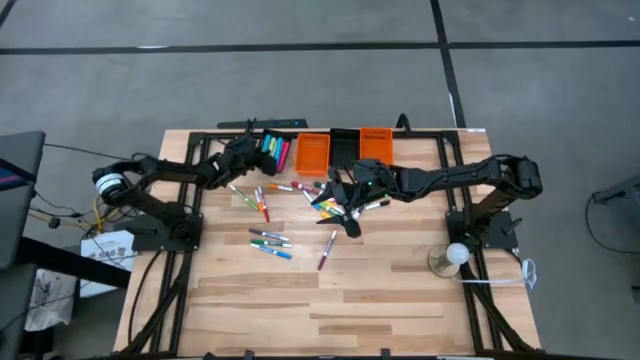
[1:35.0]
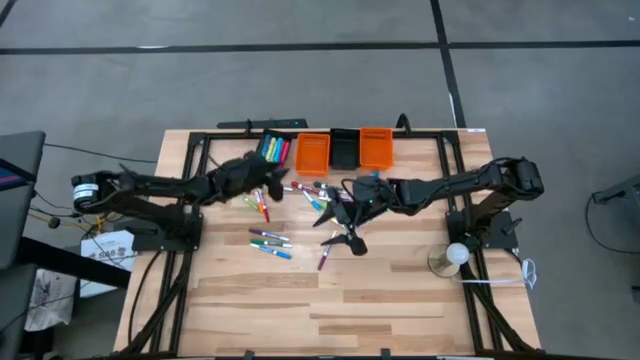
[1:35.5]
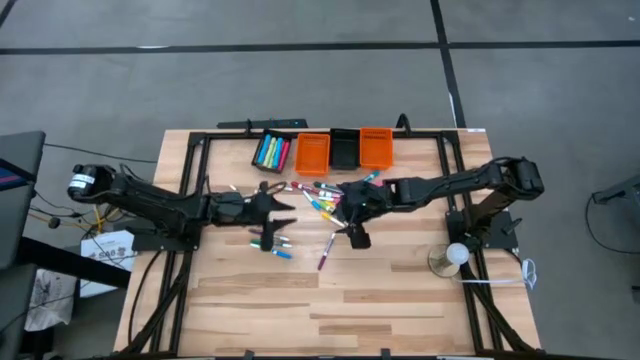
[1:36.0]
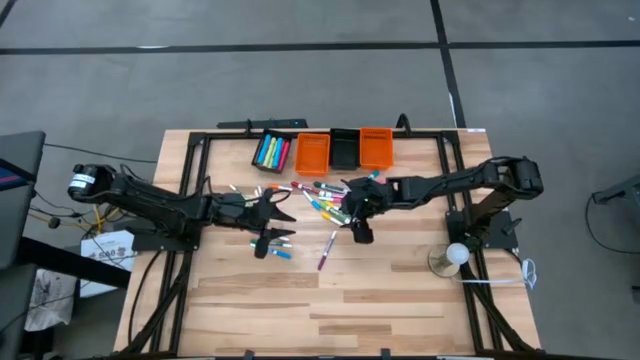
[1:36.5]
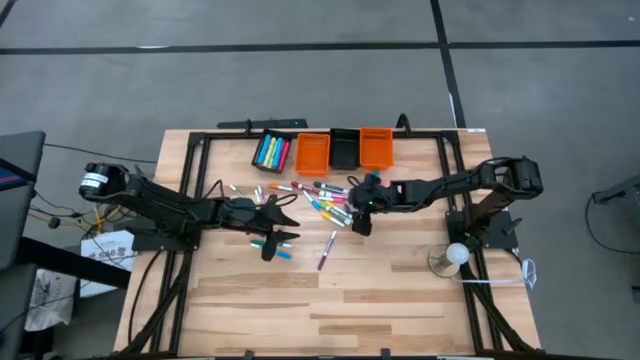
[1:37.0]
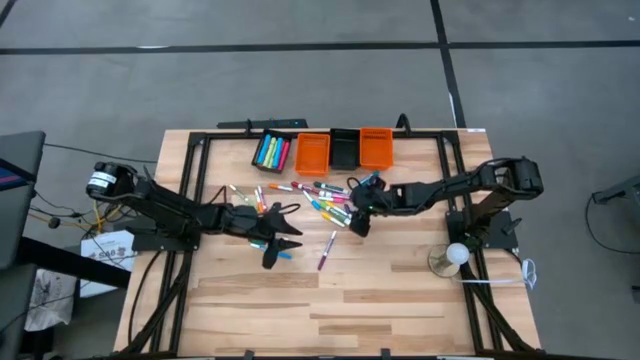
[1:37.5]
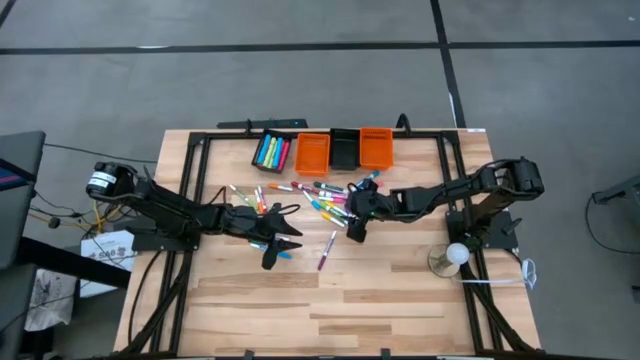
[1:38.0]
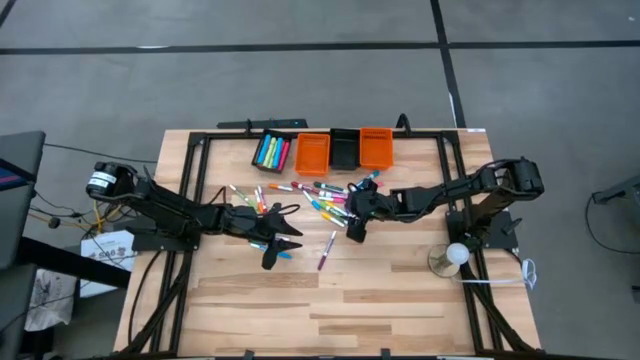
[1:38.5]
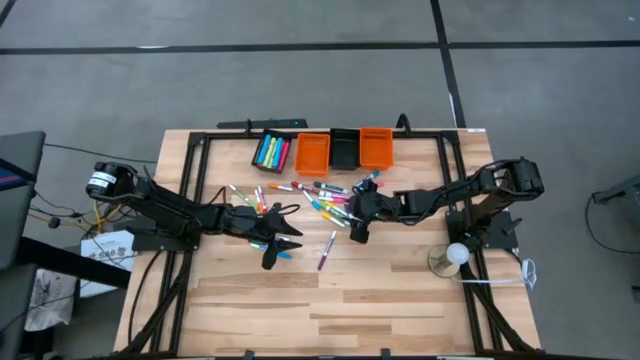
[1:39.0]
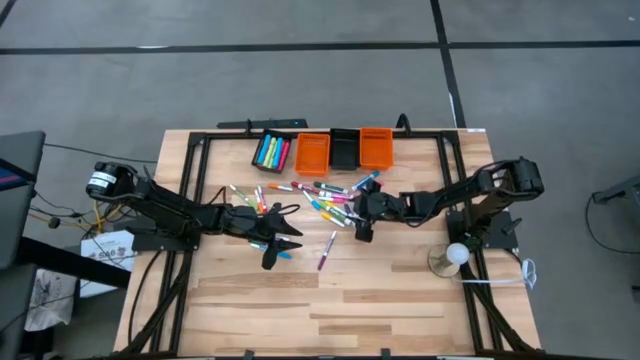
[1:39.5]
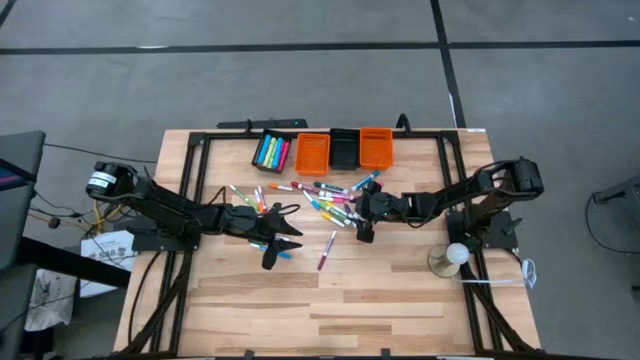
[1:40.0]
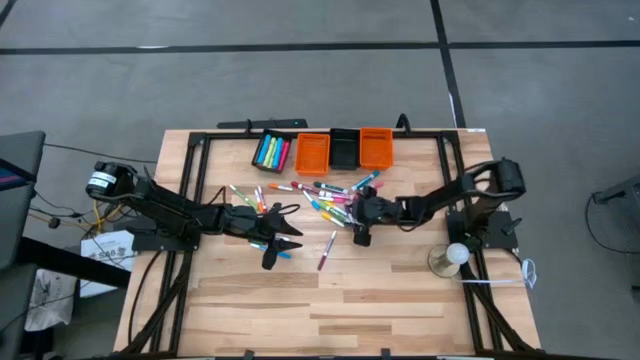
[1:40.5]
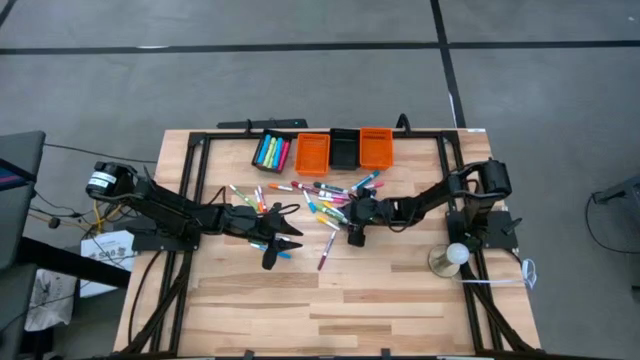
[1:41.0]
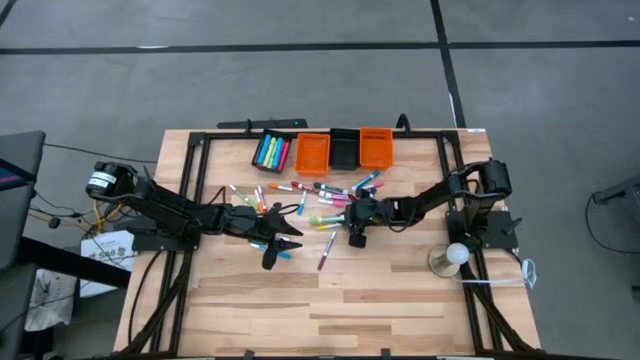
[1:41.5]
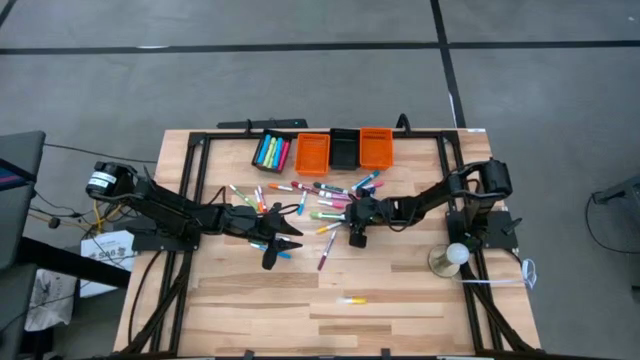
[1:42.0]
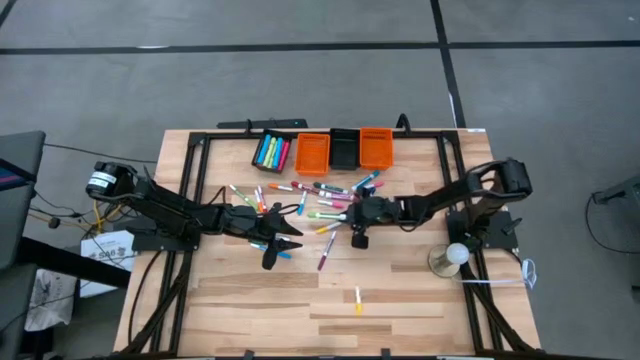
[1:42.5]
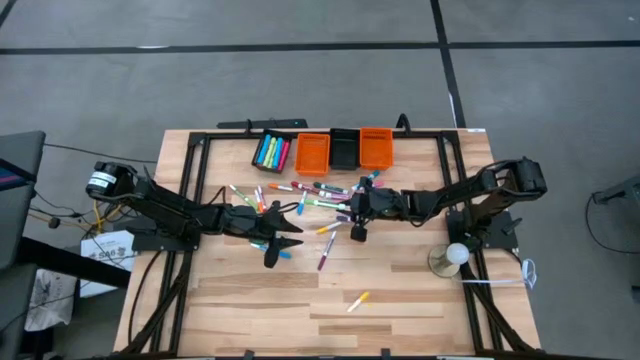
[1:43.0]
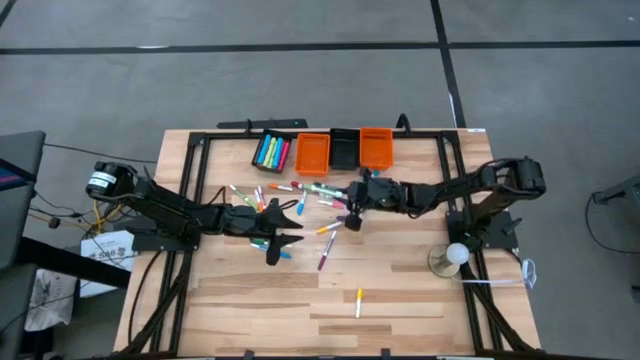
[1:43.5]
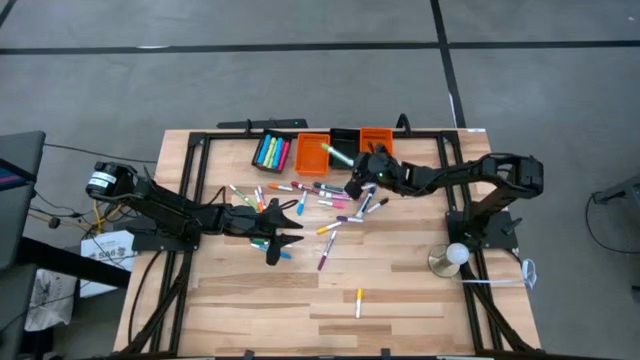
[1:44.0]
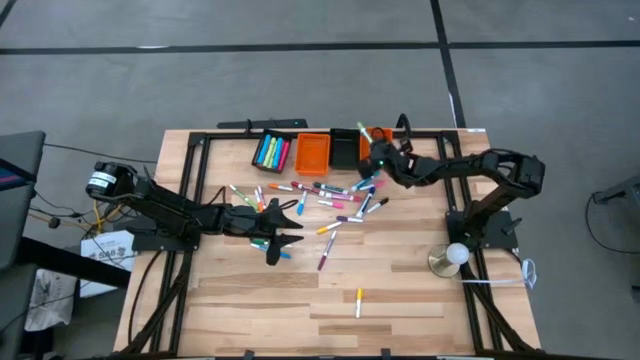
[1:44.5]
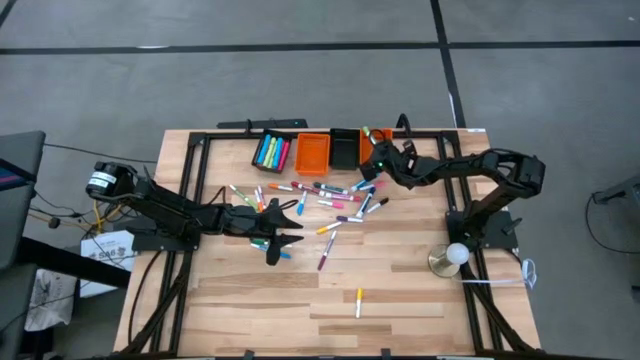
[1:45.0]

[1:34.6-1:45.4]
Task: Pick & Place Markers
Put the big light green marker pen into the right orange basket

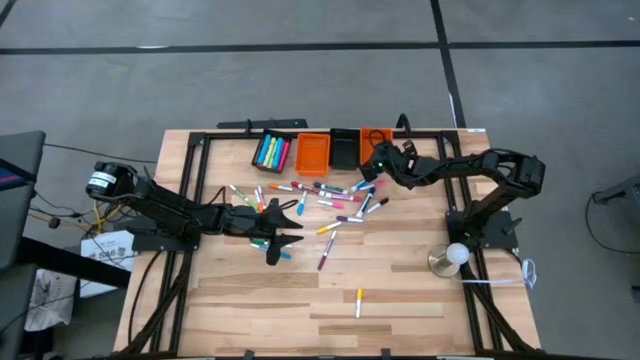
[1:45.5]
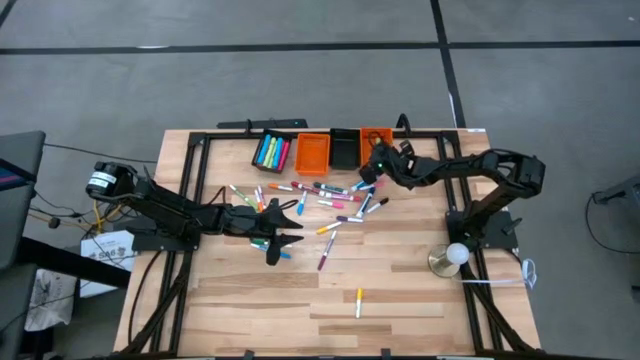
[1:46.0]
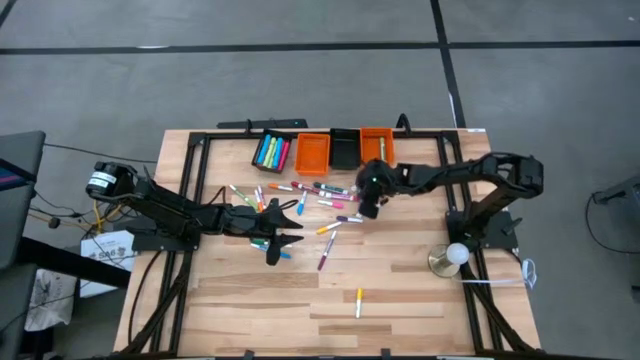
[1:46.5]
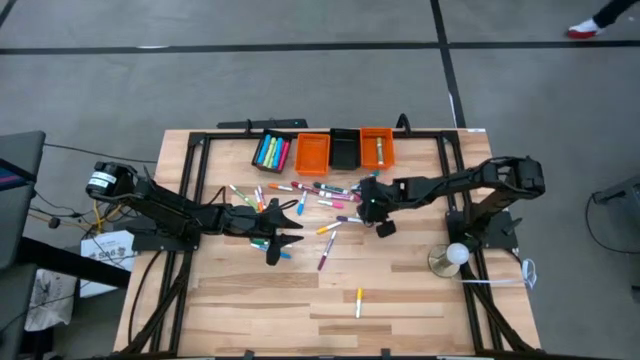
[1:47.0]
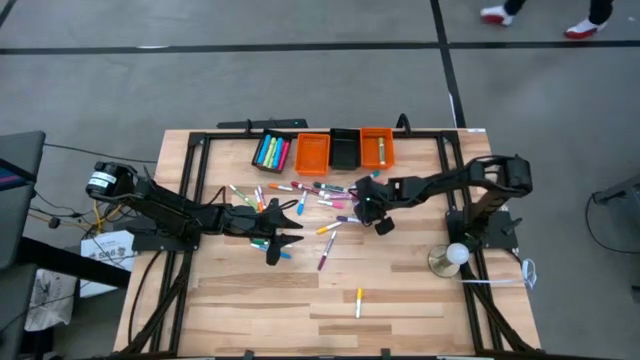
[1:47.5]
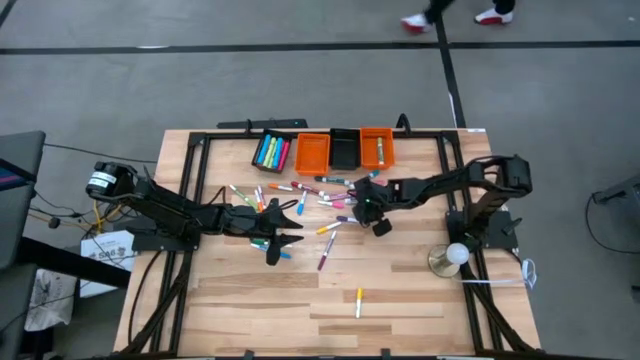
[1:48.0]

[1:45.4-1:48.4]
Put the big blue marker pen into the right orange basket

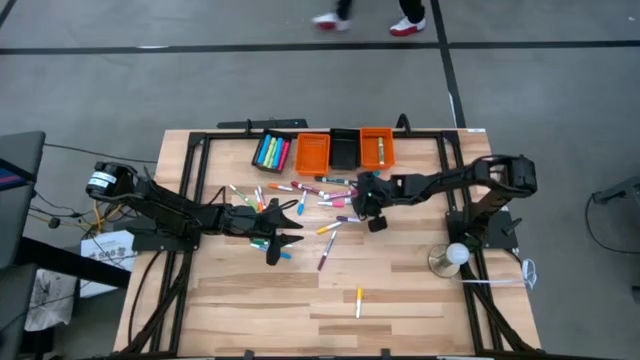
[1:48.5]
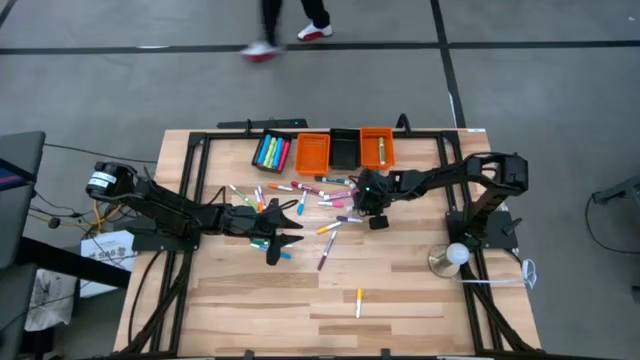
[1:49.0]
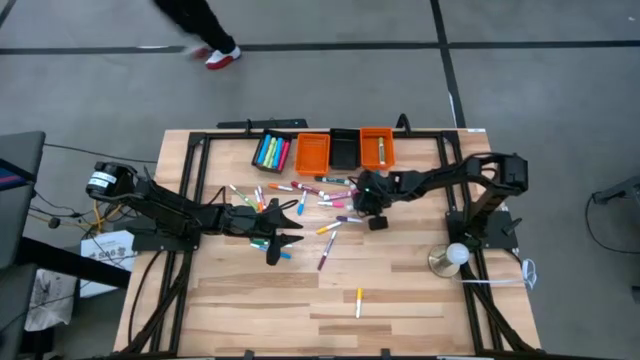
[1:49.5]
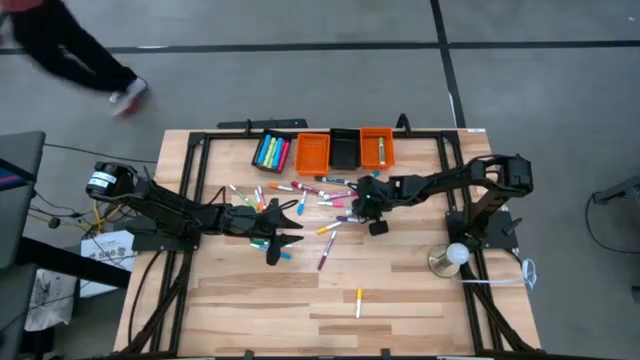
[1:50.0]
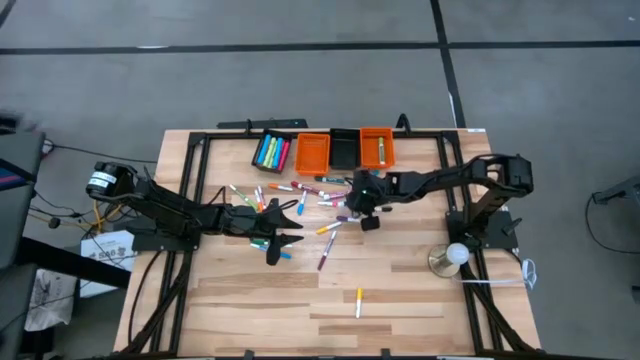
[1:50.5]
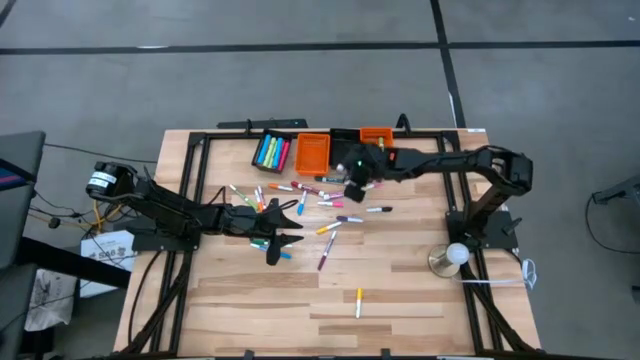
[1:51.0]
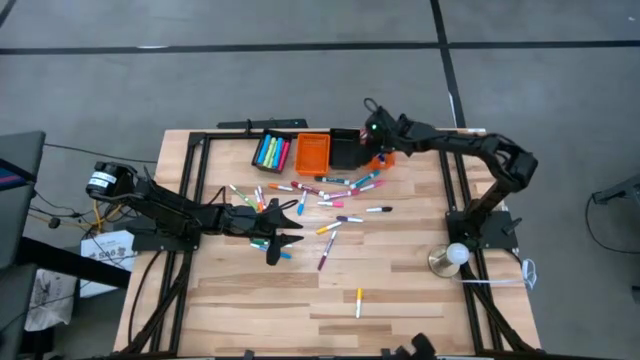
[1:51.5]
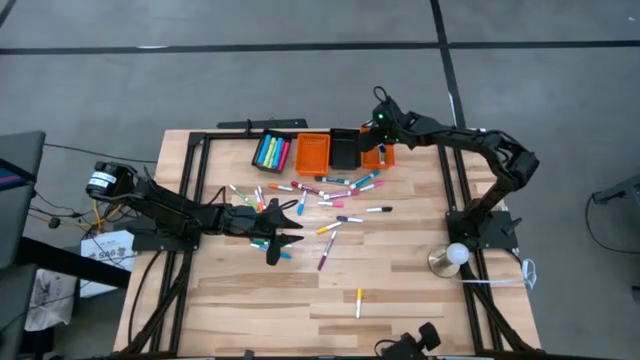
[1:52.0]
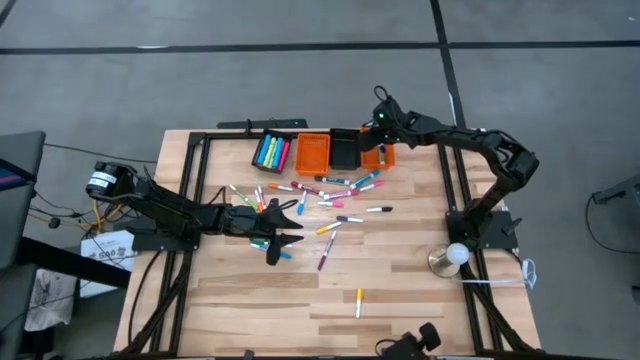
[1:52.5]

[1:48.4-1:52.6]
Put the big blue marker pen into the right orange basket

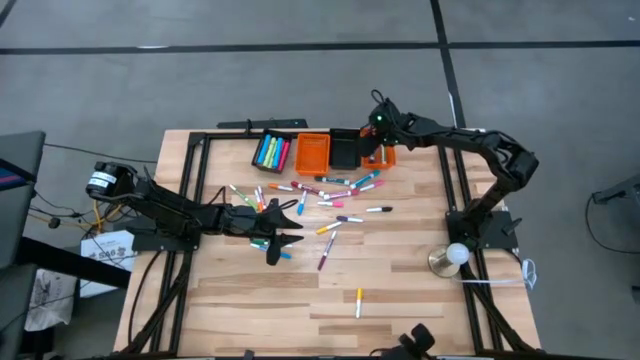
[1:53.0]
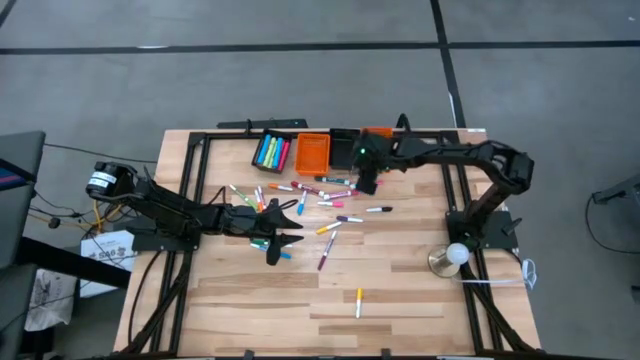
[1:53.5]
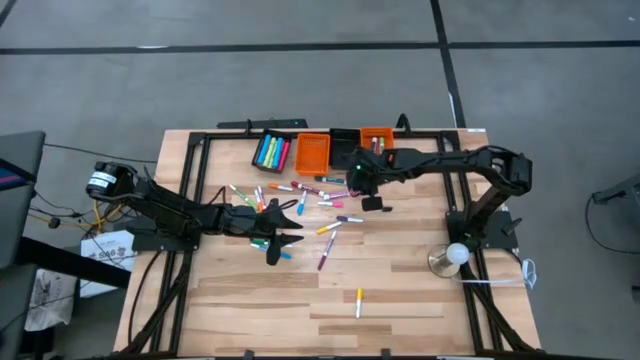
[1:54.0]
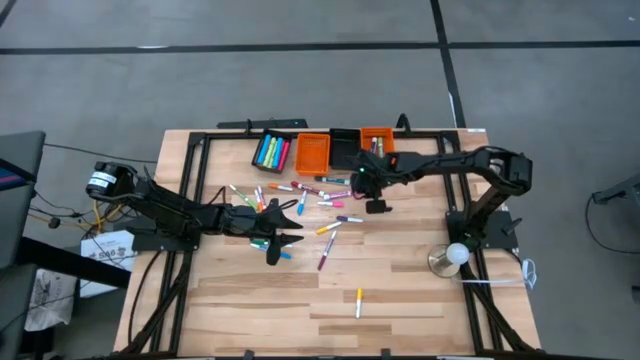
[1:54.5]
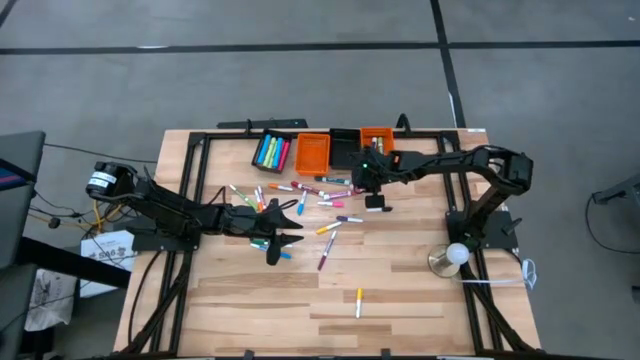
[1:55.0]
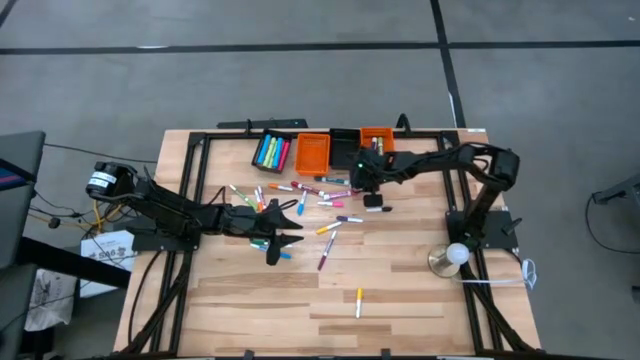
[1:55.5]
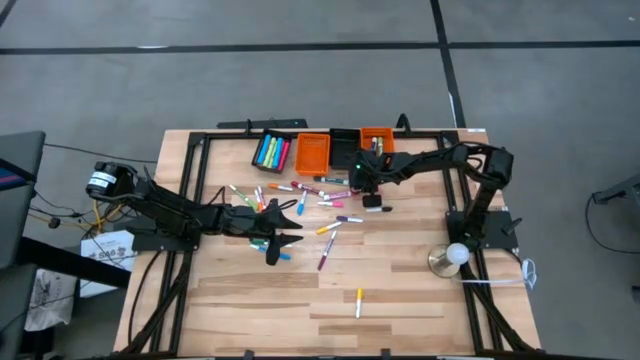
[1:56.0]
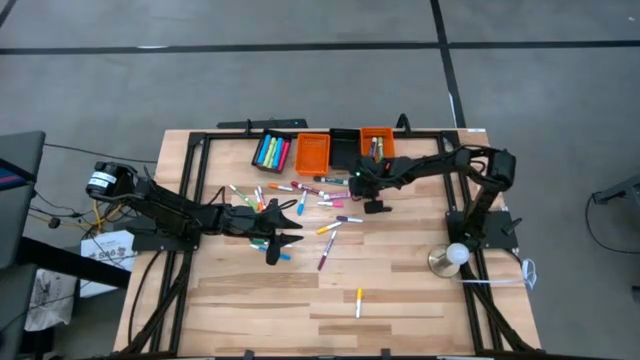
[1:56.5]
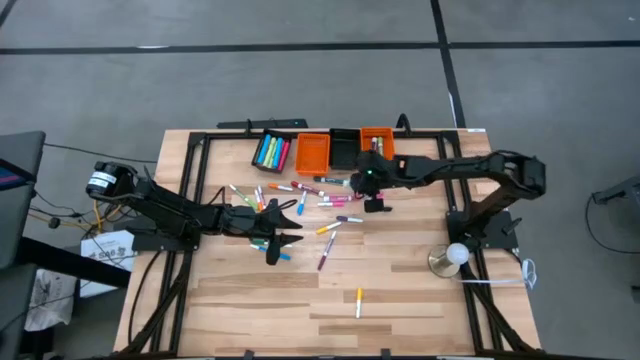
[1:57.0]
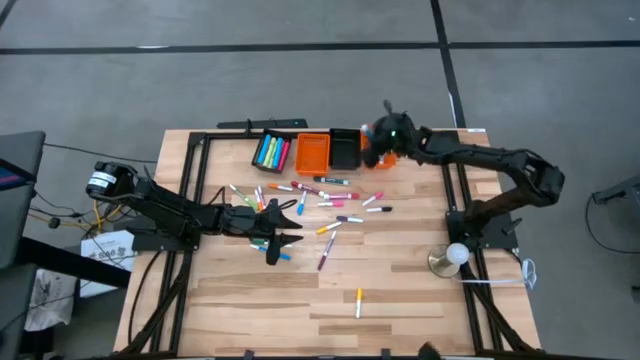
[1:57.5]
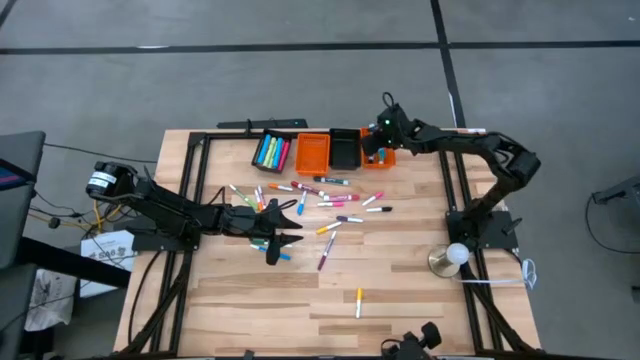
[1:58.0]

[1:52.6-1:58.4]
Put the big light blue marker pen into the right orange basket
